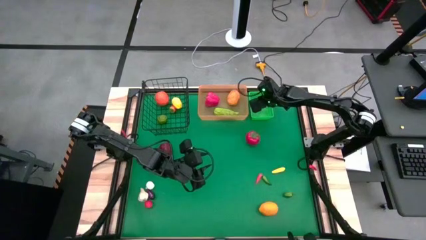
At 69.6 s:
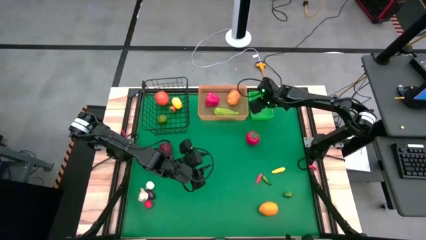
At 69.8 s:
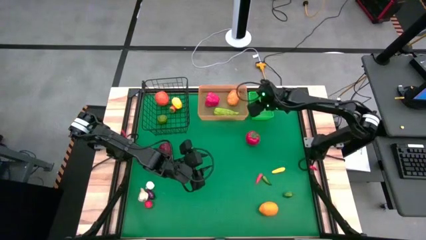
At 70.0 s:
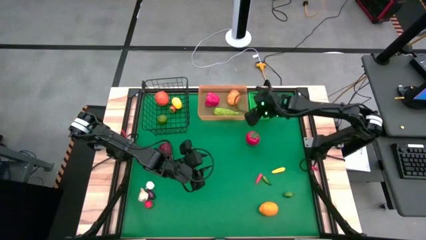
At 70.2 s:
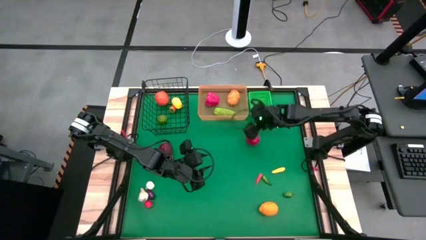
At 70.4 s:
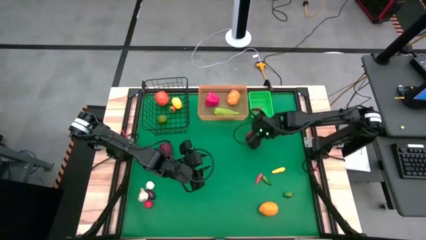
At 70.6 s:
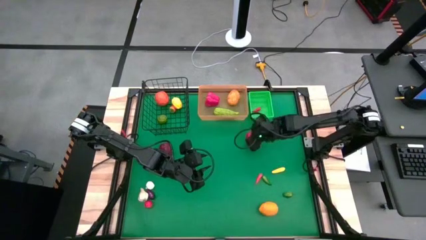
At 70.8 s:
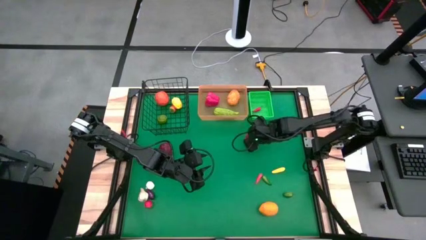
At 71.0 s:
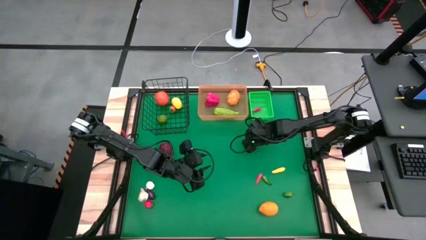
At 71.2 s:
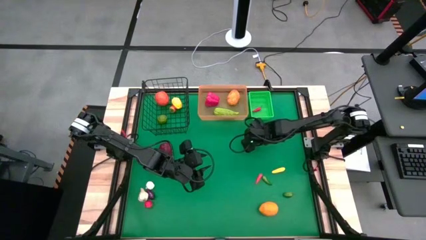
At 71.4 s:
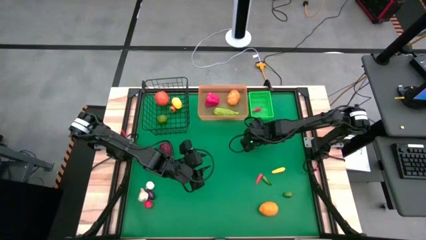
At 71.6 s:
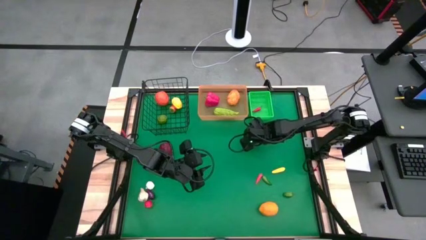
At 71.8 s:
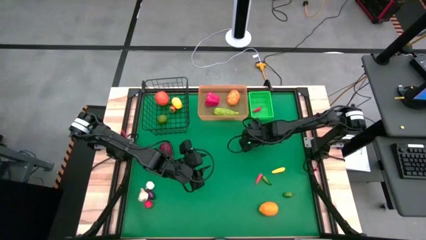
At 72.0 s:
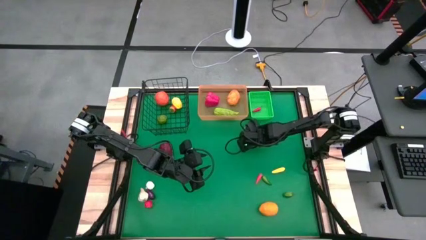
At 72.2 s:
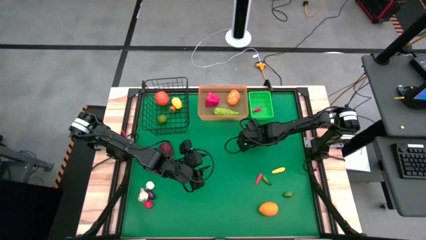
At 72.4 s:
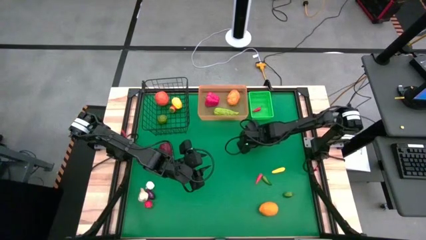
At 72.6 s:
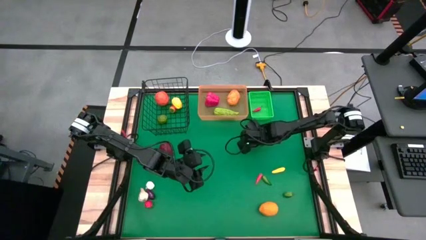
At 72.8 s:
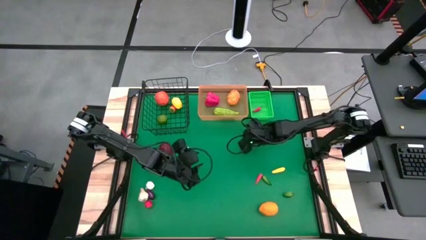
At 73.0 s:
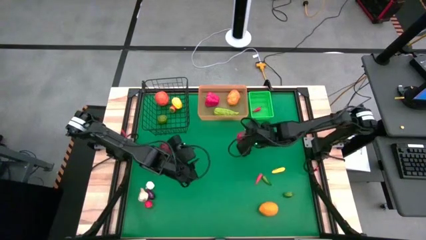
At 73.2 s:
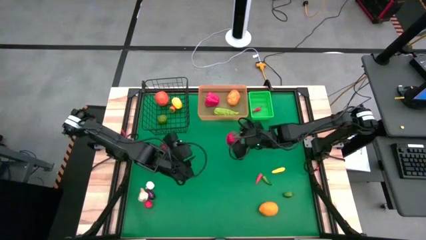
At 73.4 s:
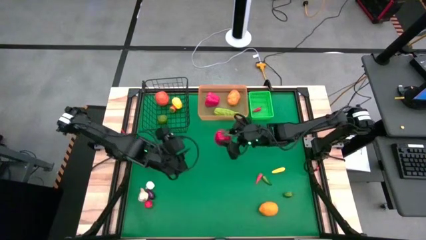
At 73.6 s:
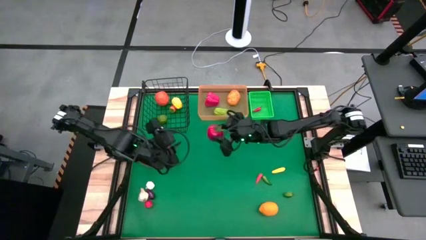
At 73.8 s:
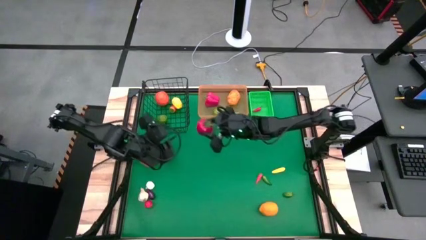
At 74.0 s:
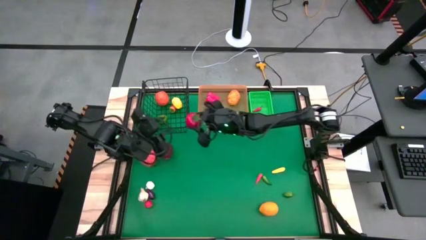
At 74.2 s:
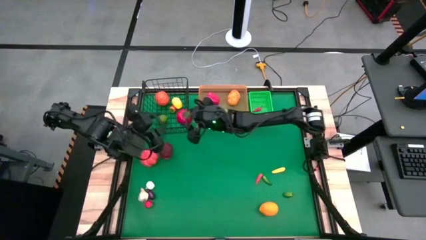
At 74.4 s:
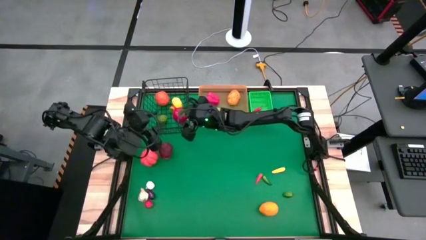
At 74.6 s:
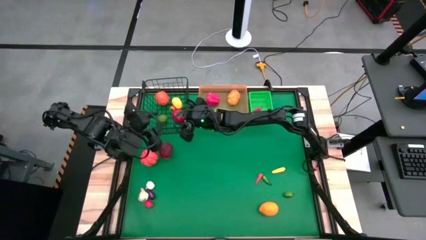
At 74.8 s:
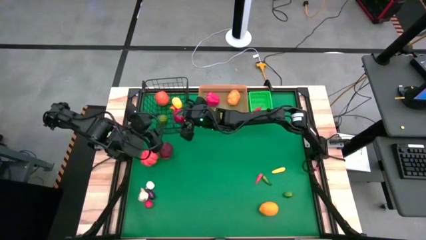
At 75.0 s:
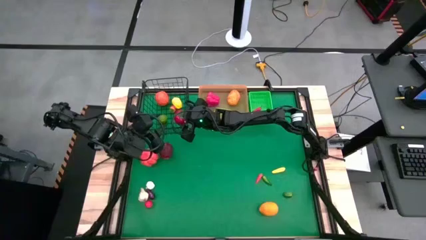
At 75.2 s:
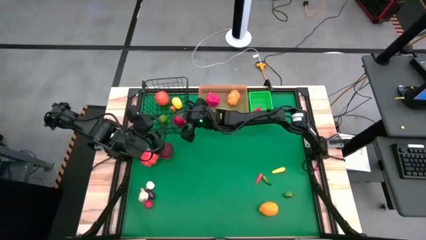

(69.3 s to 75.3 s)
Task: Sort produce into baskets
Put the red tomato into the black wire basket

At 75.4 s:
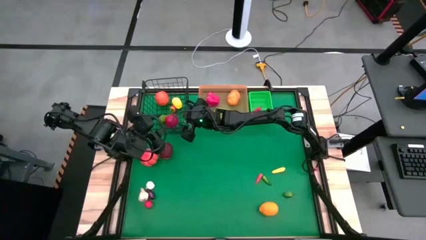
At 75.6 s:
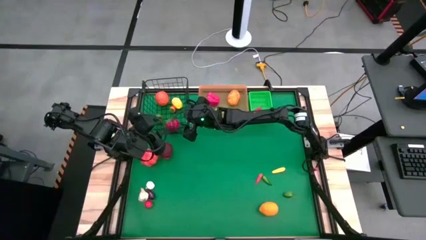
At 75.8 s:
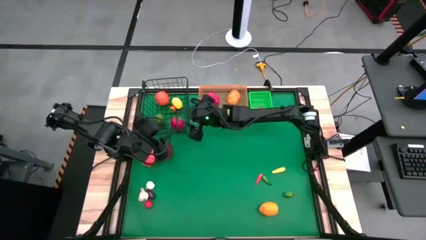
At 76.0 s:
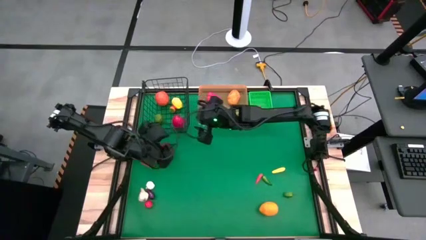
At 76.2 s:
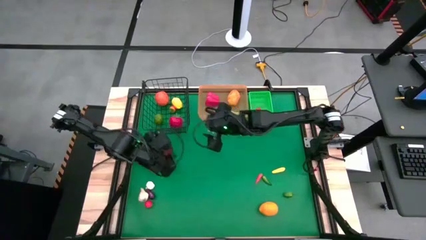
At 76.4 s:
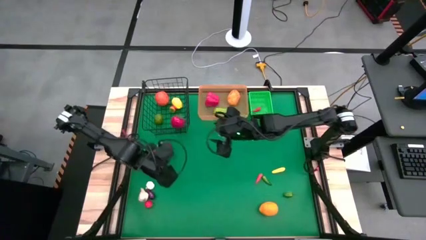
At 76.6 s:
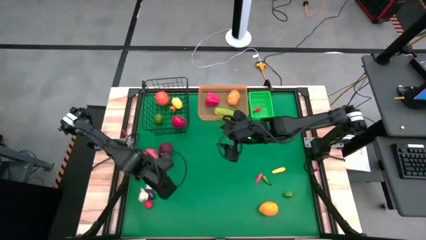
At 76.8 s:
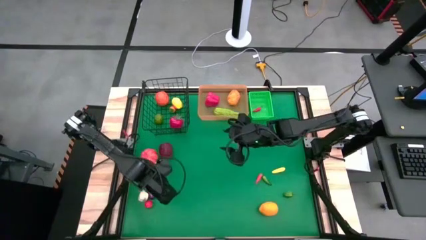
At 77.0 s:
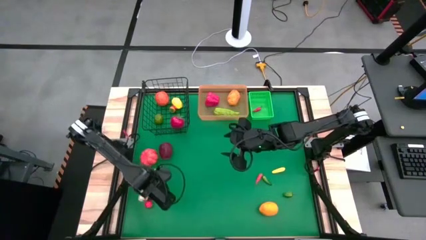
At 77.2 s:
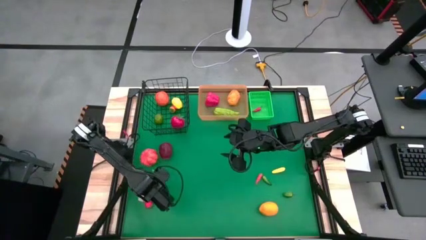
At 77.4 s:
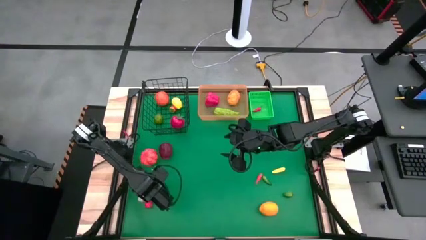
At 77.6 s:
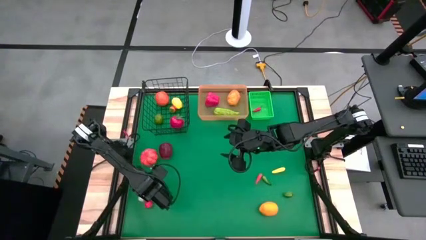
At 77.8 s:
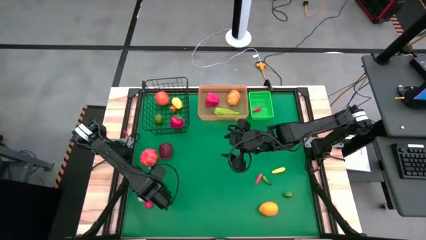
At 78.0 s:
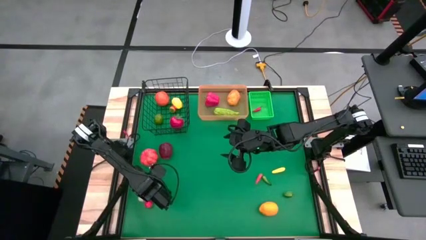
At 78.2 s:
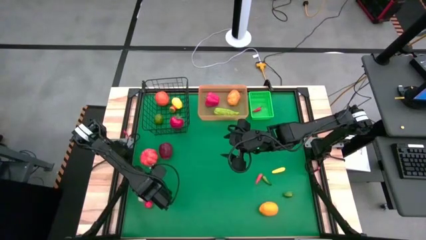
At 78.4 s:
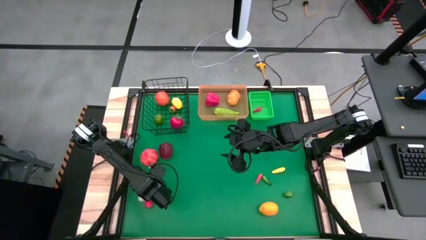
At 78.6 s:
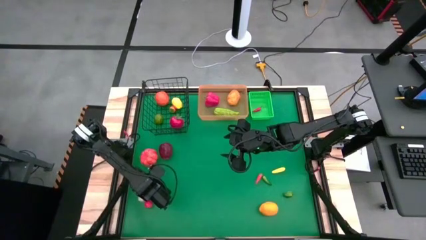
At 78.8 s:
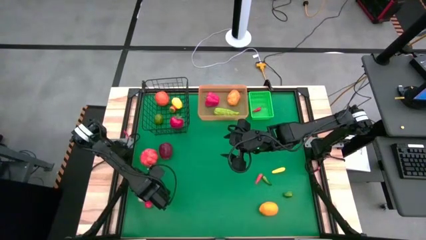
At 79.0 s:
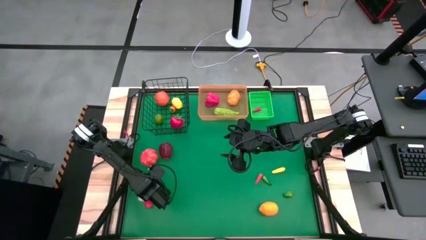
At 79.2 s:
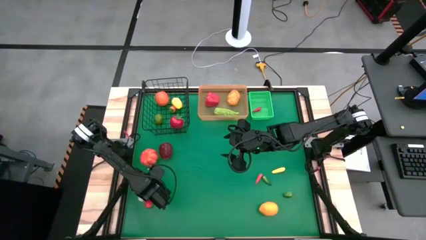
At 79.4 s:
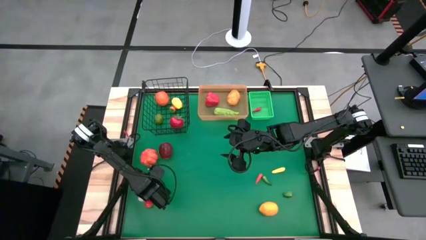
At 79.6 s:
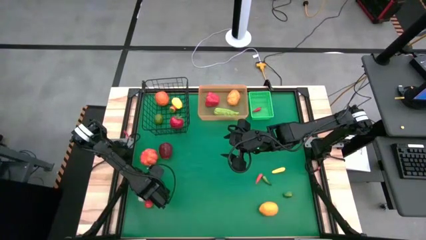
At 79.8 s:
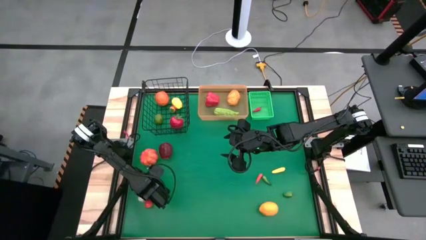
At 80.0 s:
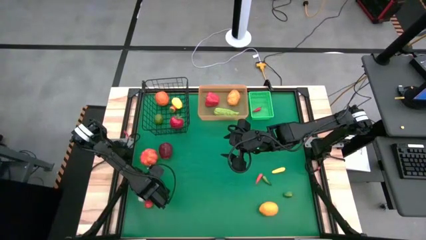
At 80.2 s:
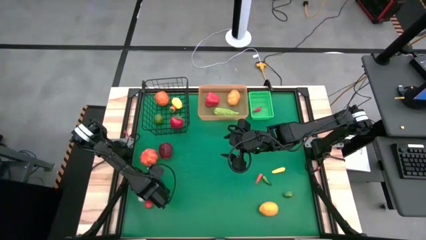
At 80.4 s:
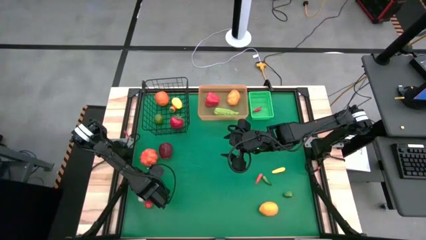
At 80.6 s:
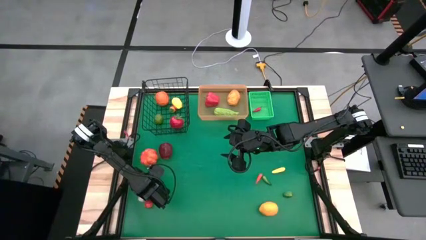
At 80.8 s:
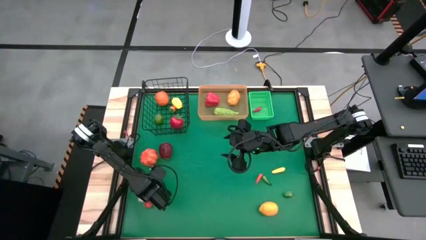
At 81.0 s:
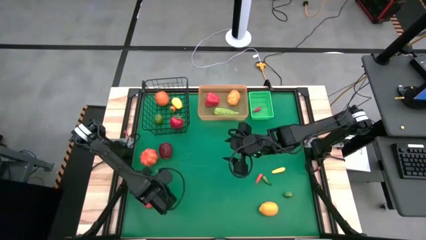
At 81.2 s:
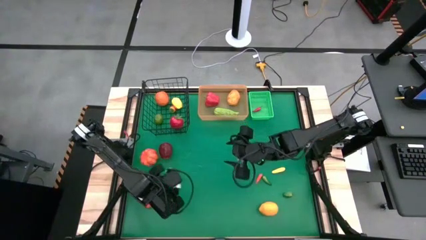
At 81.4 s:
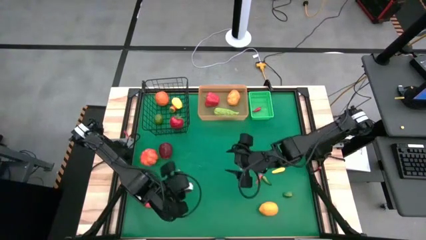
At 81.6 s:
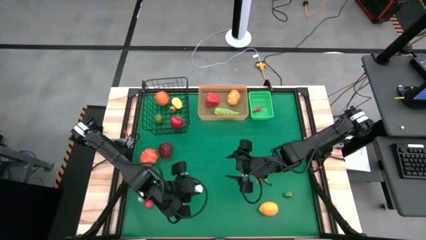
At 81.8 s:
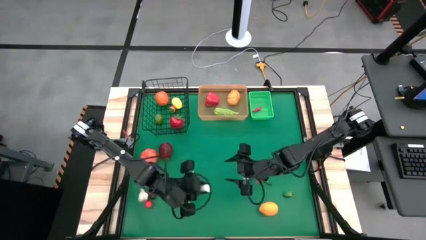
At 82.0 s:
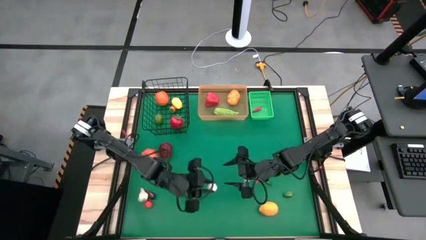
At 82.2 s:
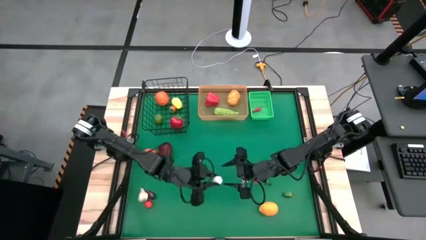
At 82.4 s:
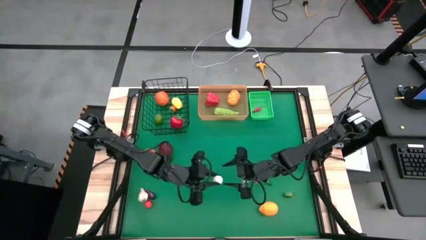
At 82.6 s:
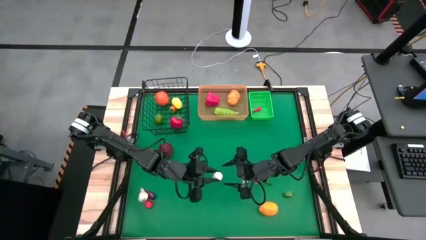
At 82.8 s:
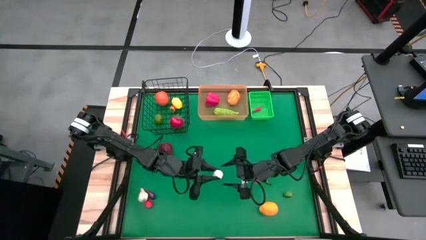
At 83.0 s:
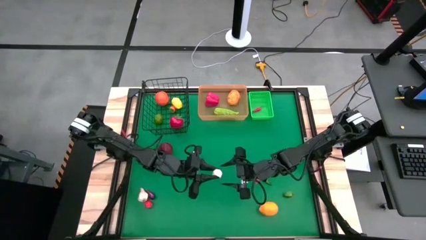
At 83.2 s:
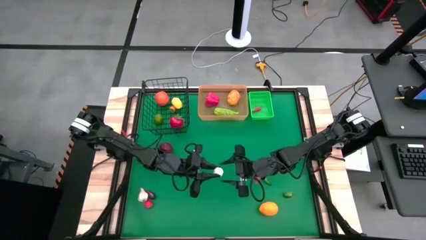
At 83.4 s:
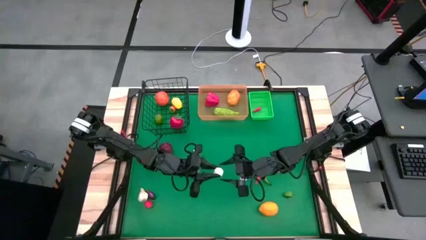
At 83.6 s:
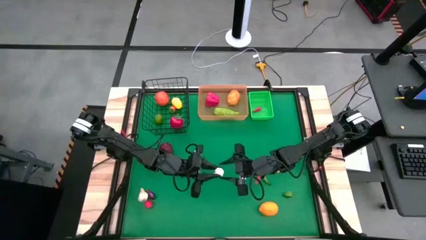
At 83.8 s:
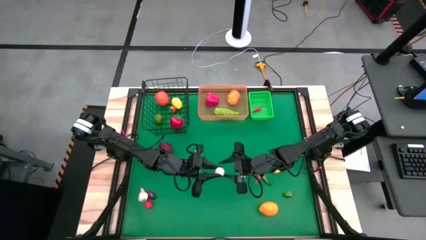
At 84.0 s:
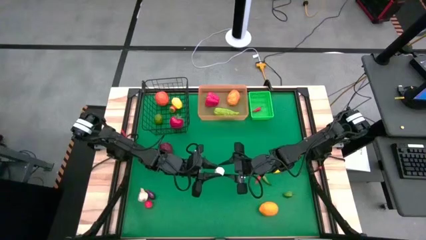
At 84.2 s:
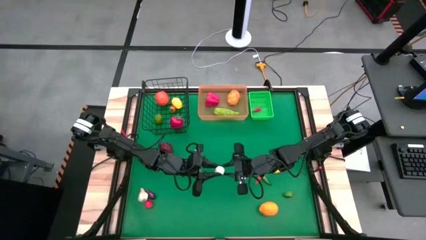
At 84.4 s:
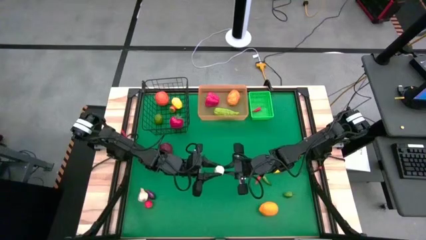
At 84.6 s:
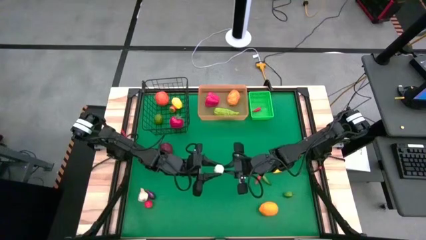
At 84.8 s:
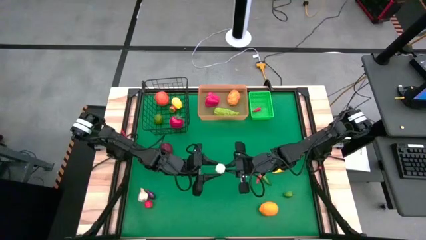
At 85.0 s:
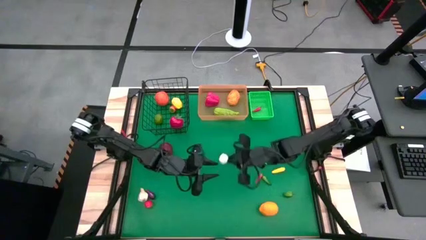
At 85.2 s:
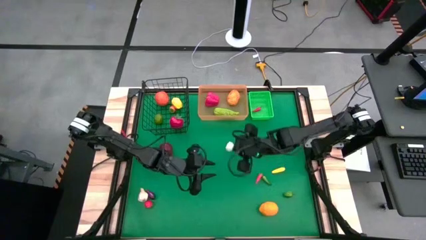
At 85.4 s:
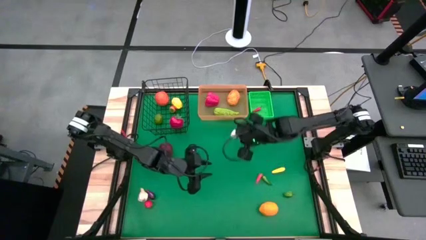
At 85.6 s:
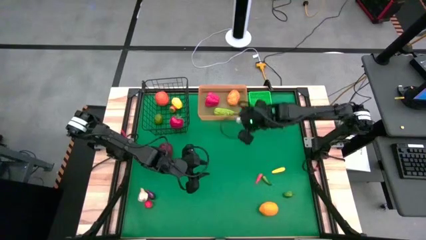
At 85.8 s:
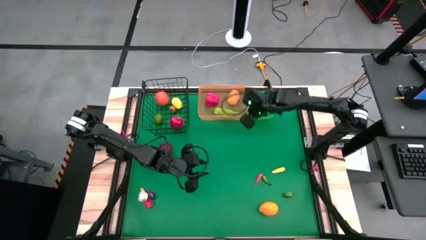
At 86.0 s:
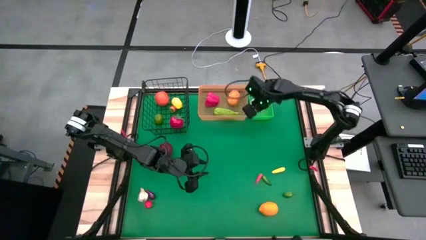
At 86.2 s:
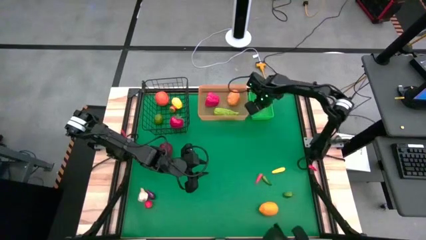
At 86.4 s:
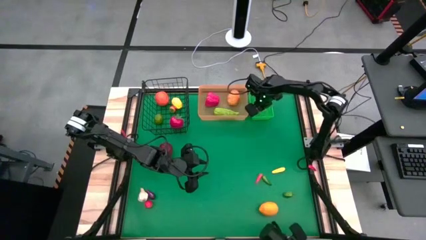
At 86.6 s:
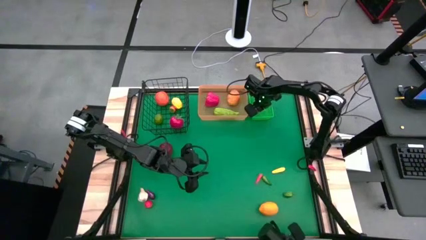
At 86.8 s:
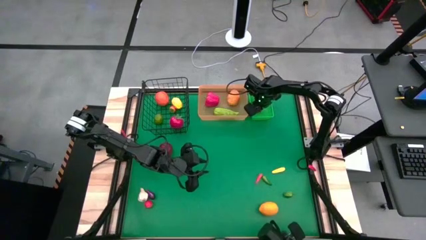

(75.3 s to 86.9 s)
Put the right white garlic into the green basket
